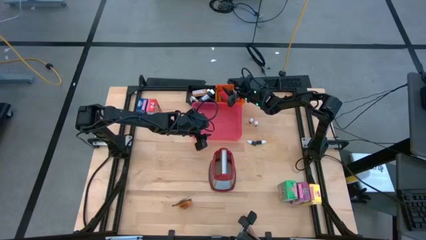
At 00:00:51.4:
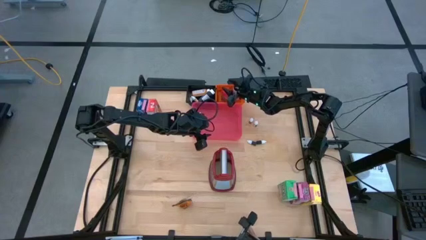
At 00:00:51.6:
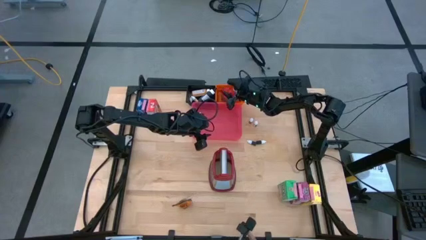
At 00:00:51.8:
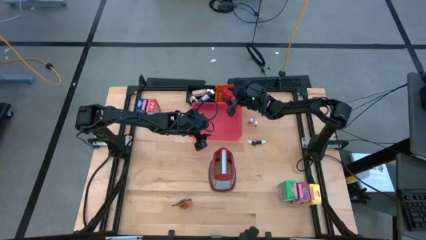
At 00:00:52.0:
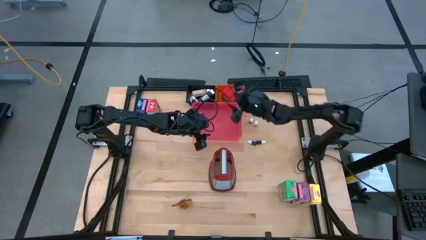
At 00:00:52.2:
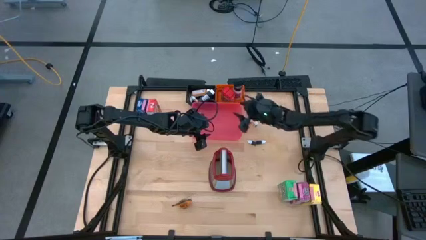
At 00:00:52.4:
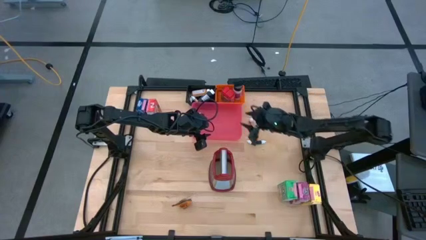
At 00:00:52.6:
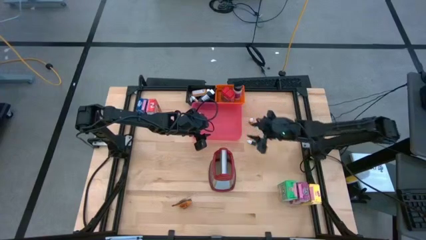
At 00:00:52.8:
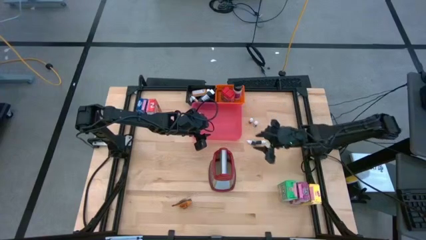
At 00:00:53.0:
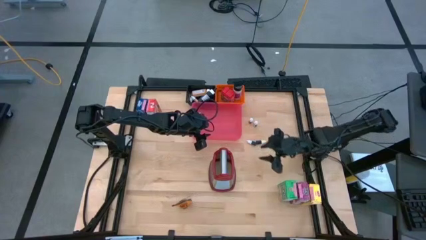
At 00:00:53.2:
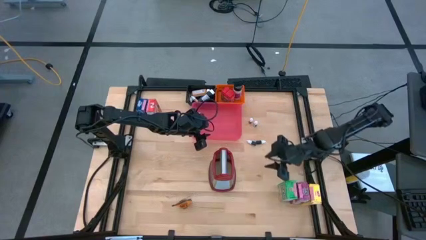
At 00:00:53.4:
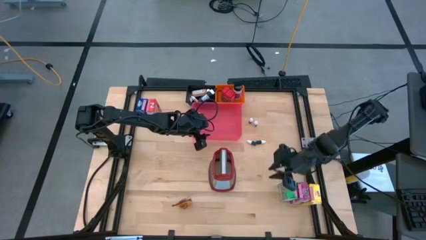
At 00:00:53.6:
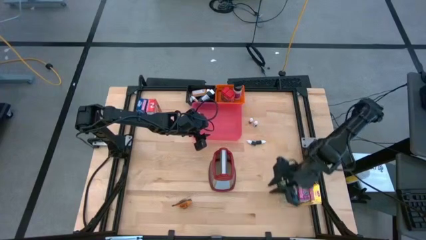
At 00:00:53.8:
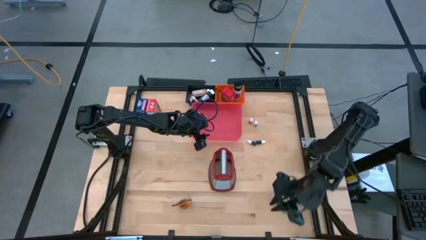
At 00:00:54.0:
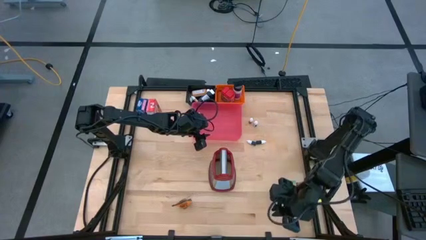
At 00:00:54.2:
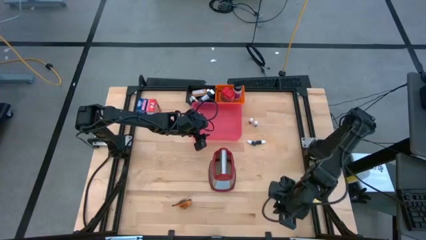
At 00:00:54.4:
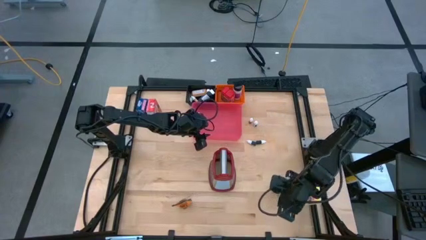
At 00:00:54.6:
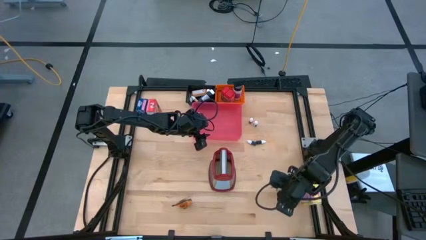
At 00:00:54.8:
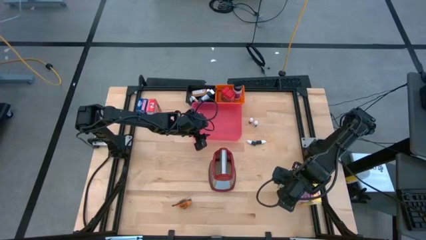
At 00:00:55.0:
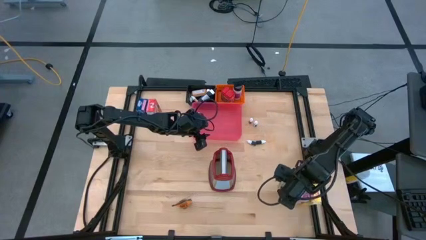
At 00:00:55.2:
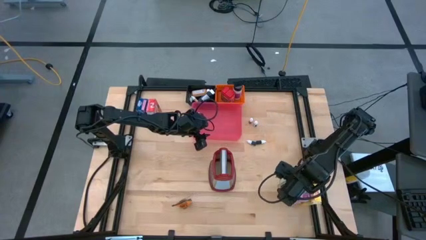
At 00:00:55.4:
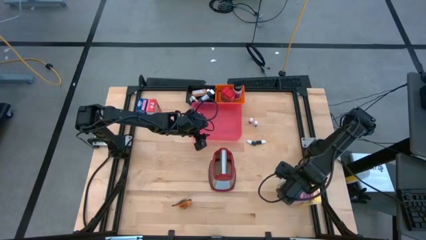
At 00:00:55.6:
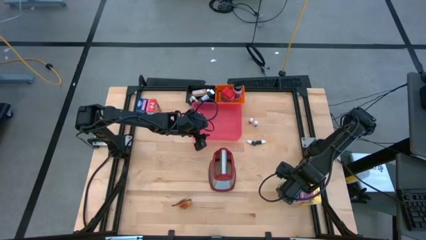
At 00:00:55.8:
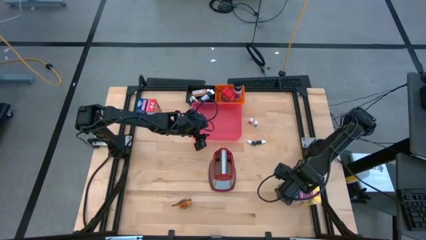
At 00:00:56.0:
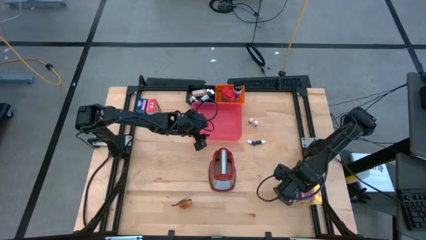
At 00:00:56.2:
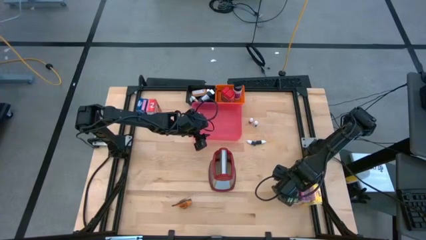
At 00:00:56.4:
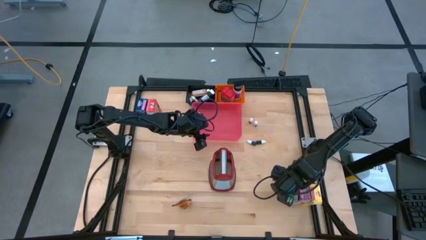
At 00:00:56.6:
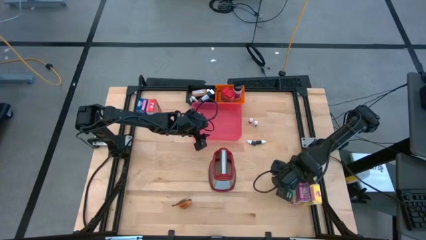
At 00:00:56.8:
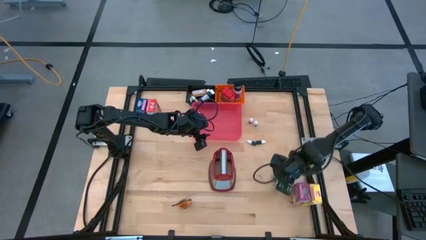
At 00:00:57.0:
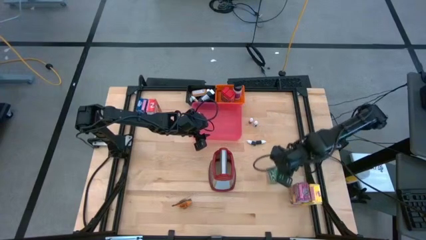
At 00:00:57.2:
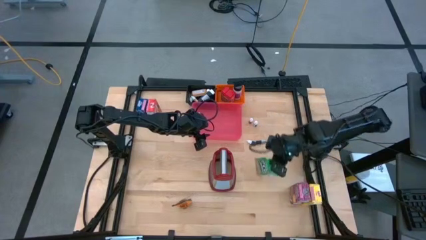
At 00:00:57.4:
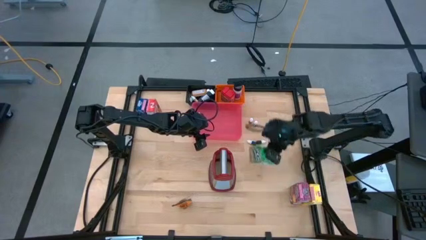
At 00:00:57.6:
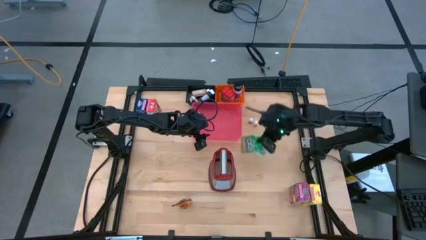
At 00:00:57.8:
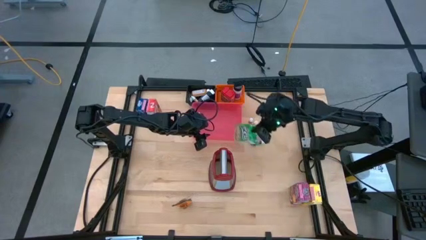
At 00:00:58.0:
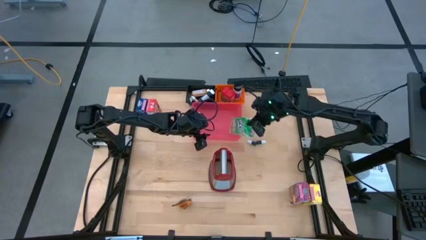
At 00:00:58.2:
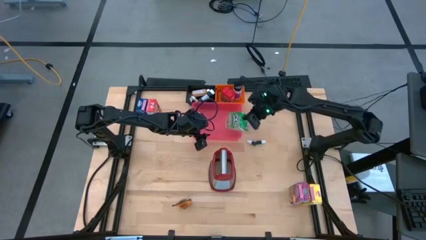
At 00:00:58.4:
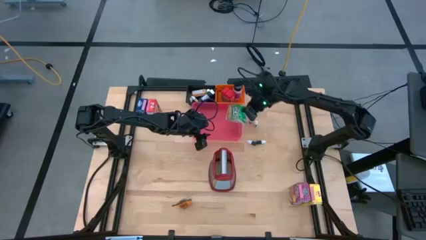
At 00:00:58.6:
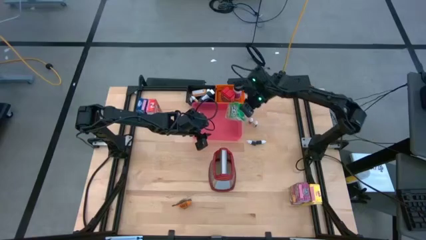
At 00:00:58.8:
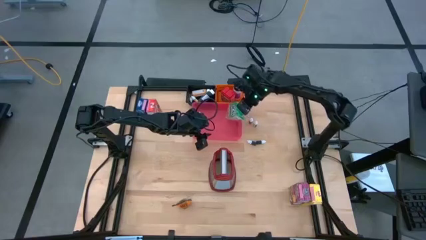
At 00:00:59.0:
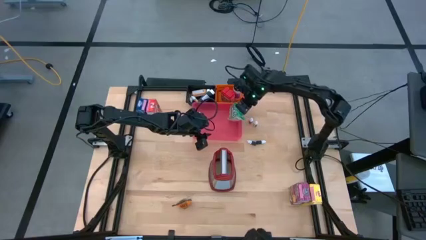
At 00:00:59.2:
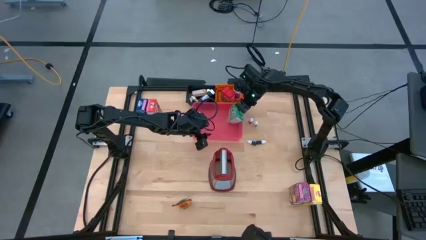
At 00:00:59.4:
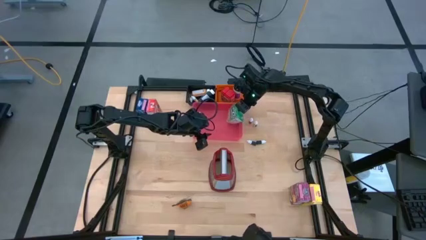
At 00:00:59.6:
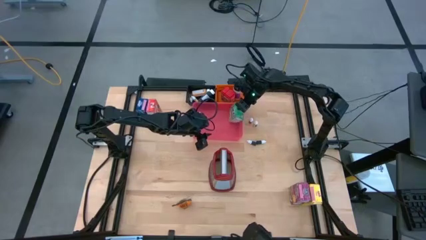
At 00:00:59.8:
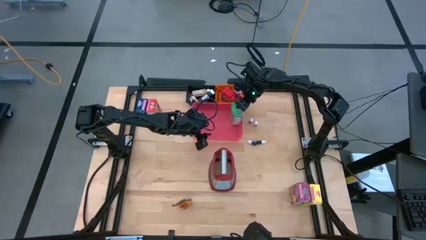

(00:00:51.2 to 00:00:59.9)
Task: Pick & Place Kitchen Items
Put the green cereal box into the pink bin

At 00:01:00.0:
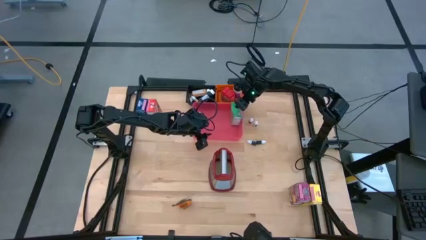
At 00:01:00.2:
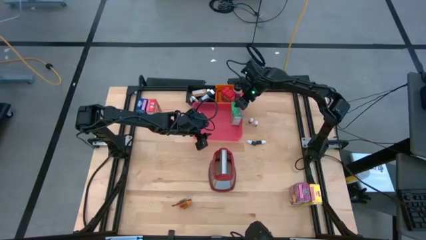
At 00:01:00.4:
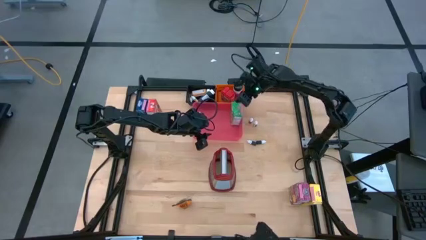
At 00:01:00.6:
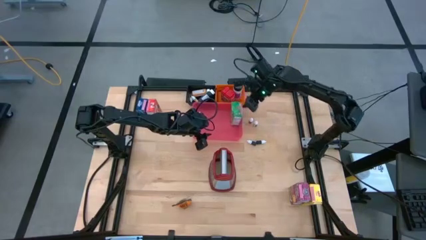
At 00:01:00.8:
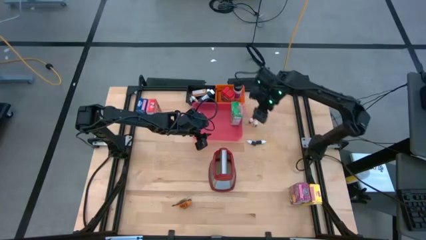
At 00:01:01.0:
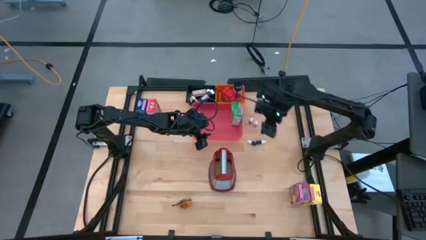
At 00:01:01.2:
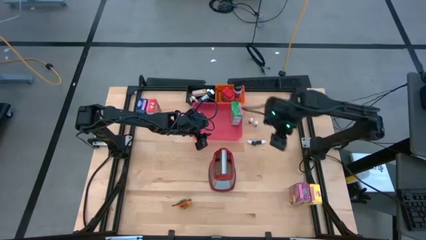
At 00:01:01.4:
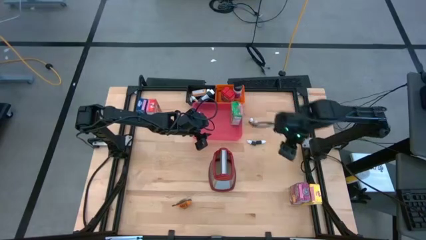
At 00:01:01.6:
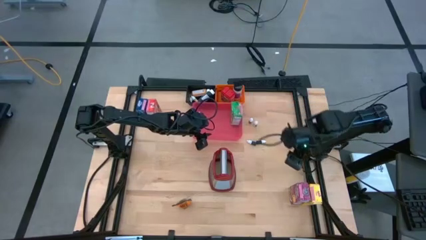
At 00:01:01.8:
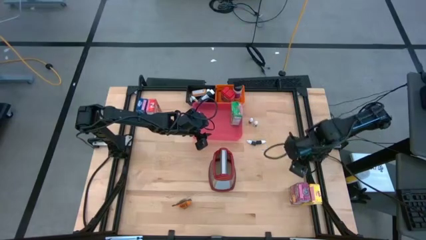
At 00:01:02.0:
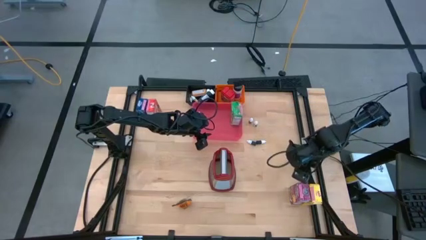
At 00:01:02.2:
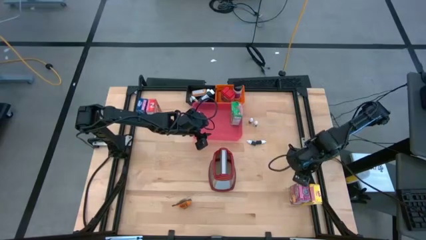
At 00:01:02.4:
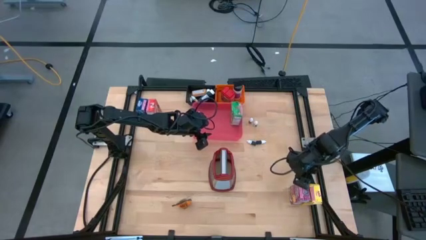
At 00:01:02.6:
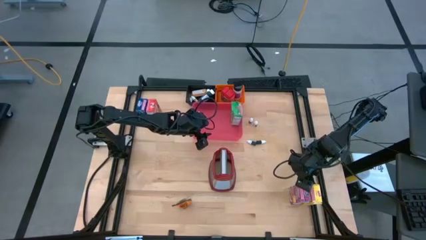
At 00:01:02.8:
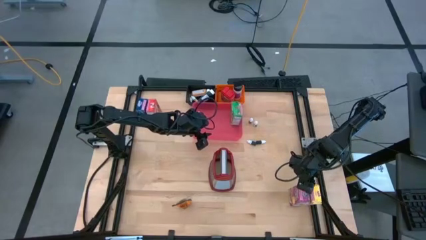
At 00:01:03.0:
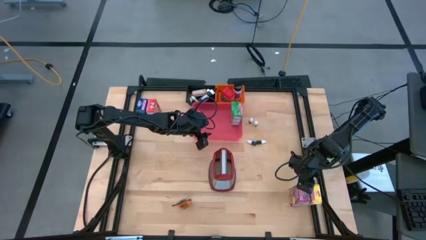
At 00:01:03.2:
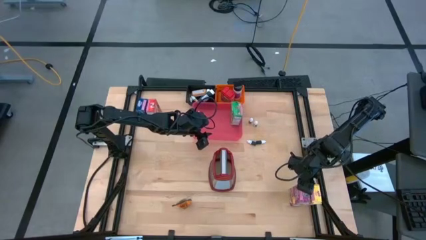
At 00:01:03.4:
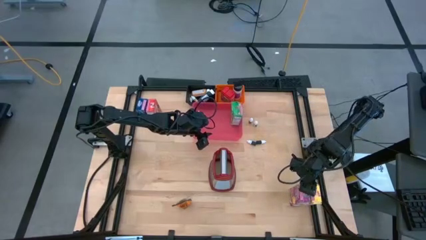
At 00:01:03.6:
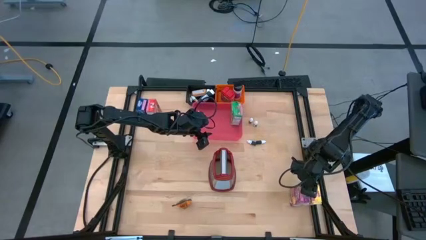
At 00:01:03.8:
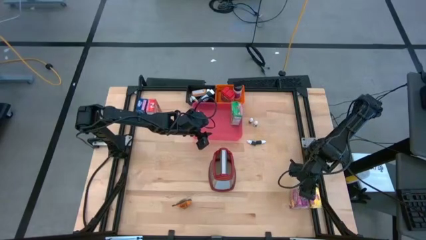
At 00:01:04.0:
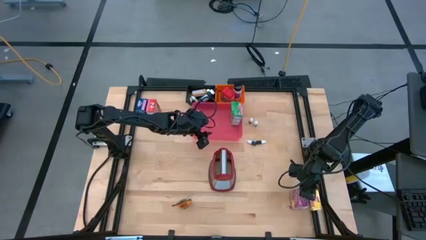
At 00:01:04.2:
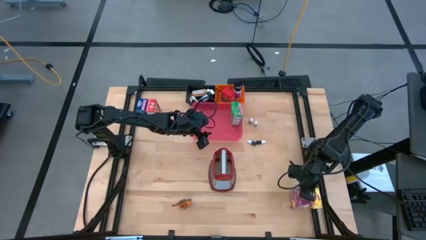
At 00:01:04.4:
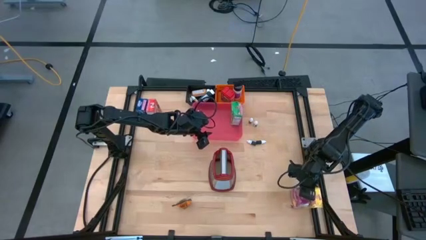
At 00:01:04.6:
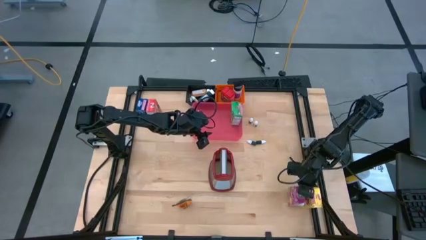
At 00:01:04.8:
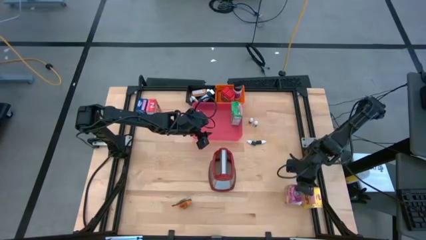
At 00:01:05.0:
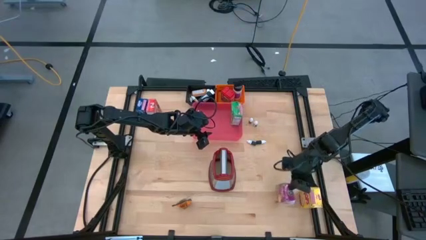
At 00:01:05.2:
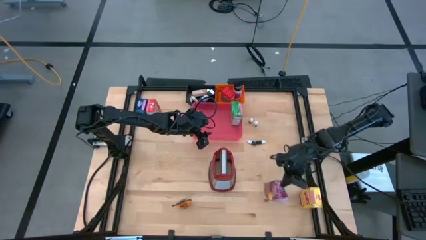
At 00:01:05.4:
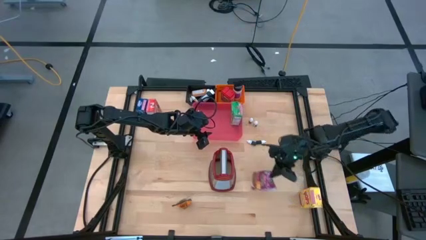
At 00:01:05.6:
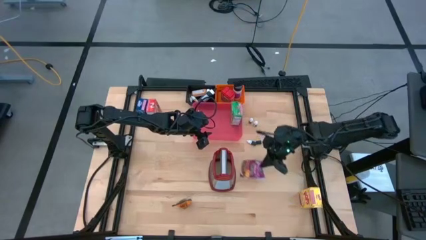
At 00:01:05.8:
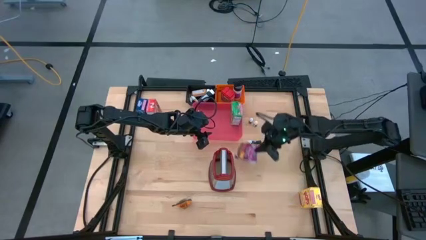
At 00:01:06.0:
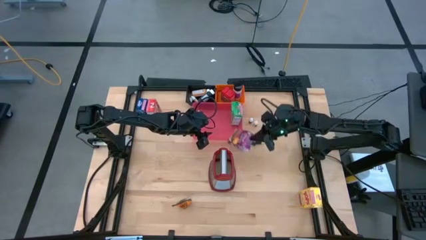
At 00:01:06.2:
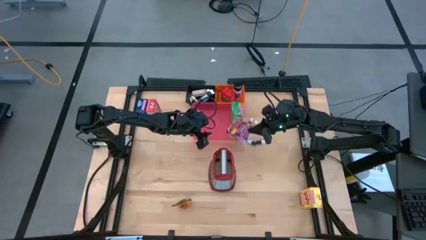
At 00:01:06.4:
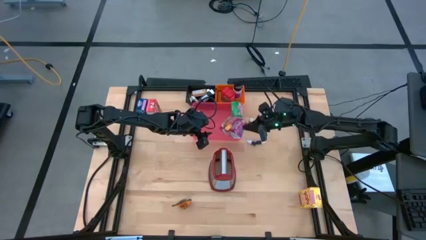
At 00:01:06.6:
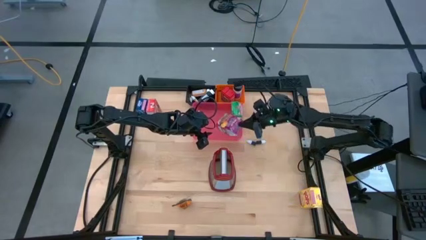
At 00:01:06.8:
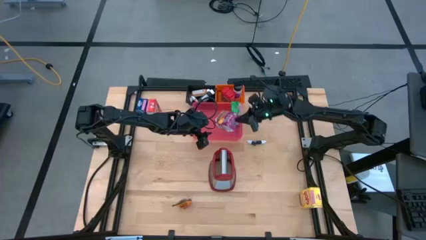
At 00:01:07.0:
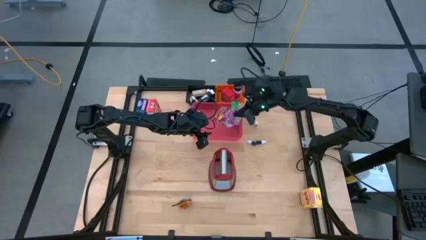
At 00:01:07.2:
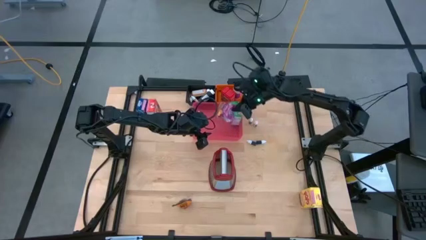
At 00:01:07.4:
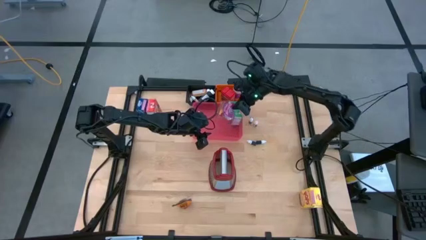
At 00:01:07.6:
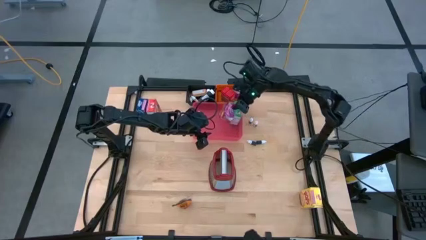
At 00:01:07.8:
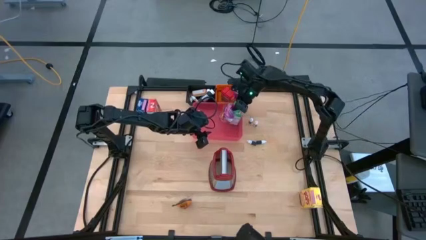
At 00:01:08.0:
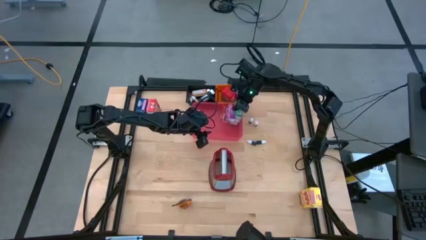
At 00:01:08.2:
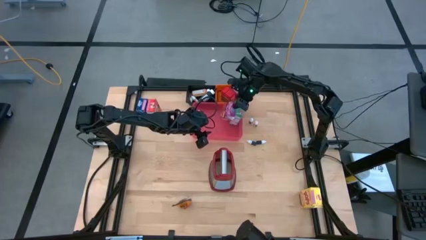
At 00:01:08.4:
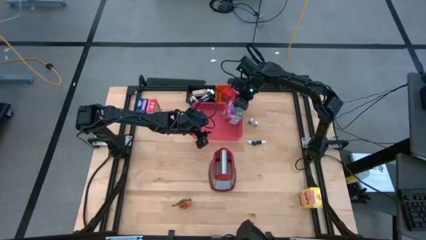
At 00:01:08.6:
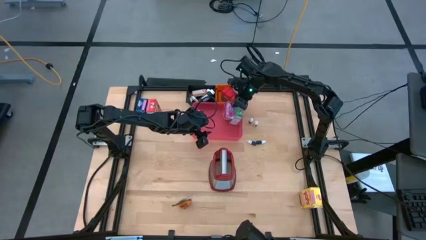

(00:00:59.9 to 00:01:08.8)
Put the purple cereal box into the pink bin
